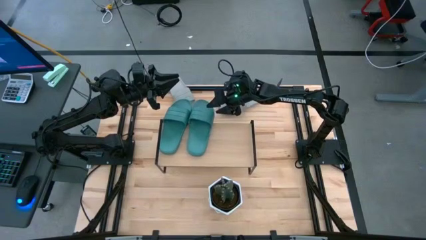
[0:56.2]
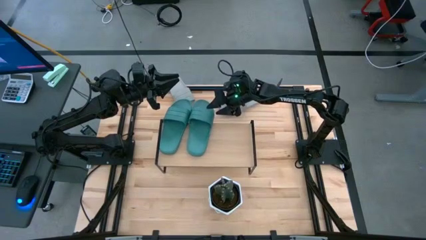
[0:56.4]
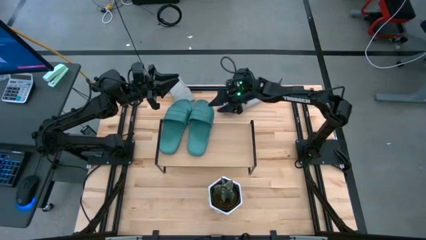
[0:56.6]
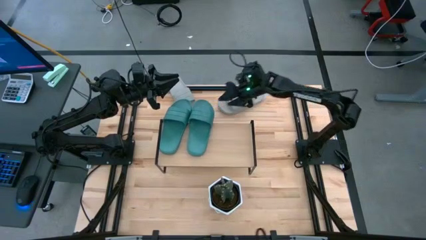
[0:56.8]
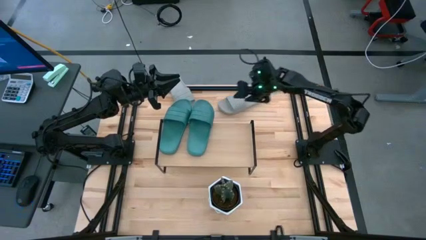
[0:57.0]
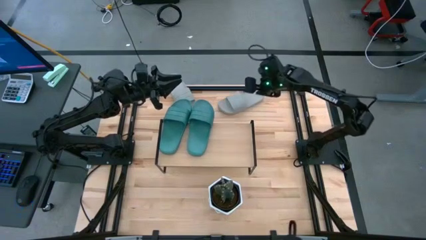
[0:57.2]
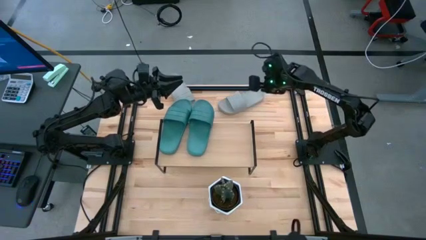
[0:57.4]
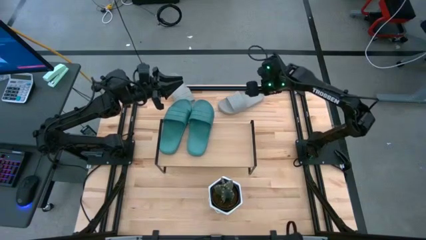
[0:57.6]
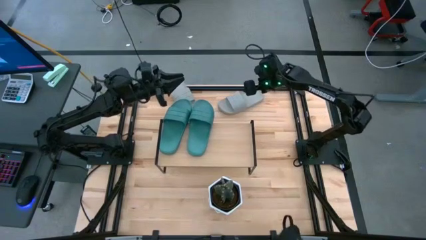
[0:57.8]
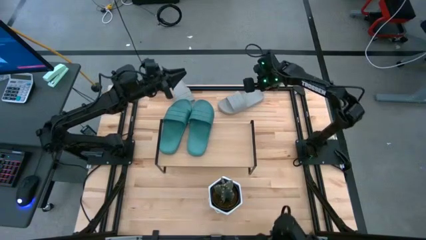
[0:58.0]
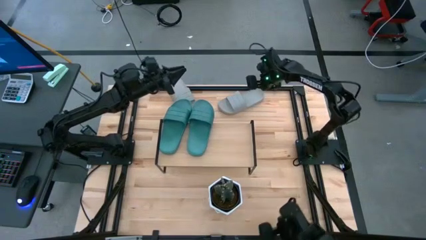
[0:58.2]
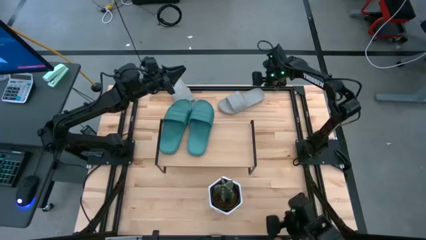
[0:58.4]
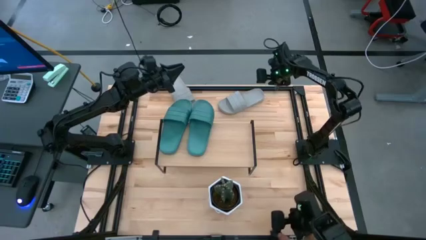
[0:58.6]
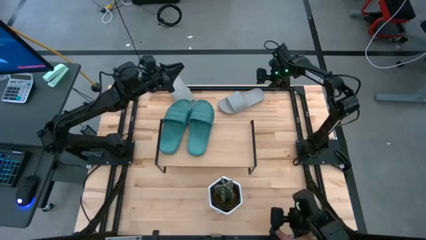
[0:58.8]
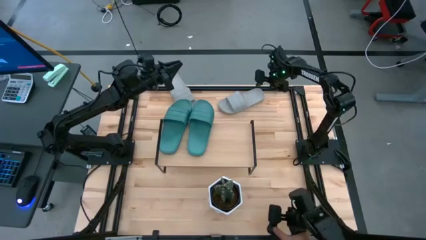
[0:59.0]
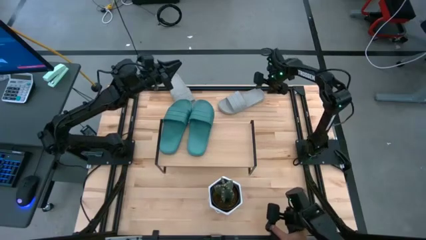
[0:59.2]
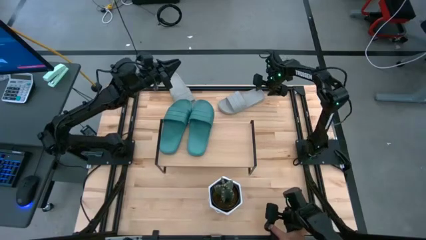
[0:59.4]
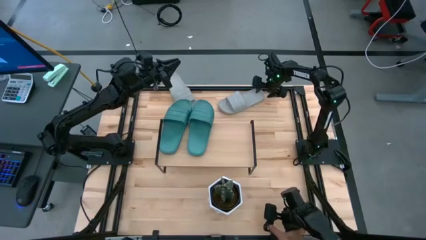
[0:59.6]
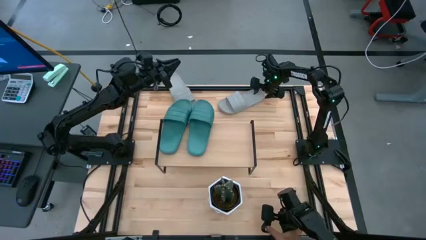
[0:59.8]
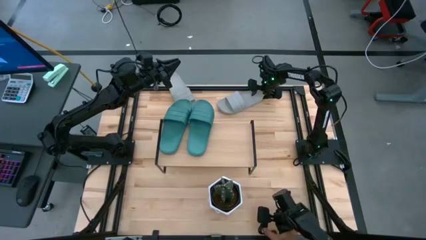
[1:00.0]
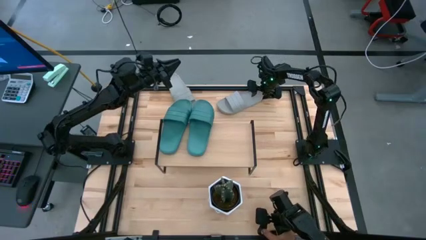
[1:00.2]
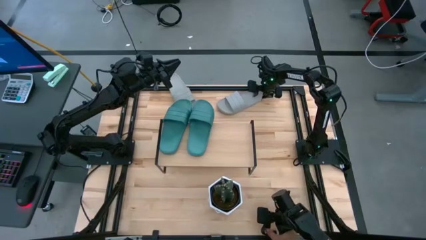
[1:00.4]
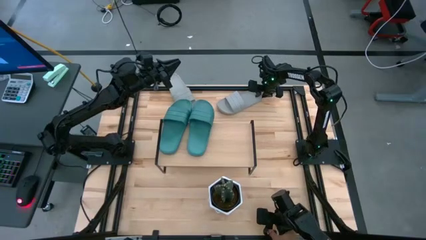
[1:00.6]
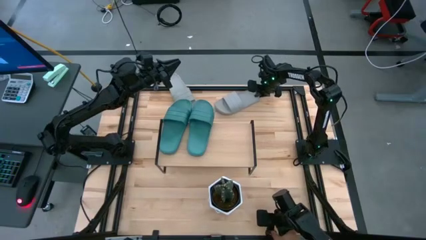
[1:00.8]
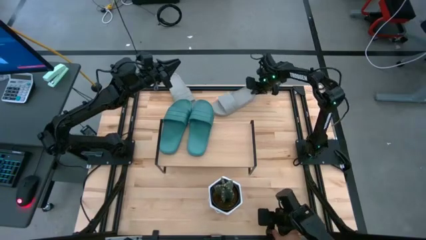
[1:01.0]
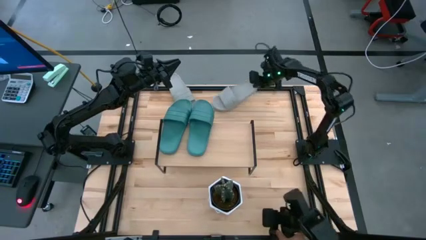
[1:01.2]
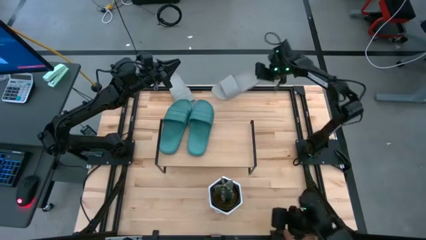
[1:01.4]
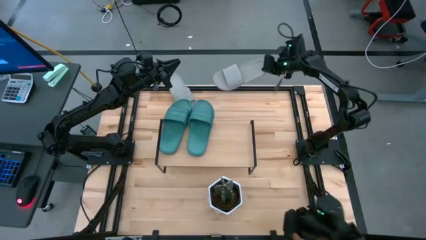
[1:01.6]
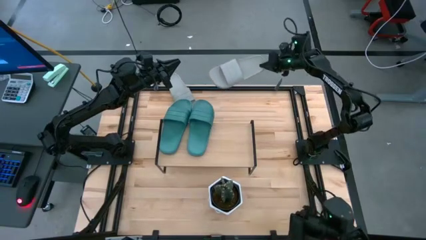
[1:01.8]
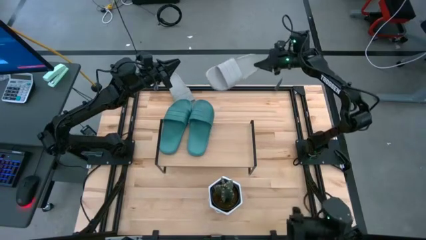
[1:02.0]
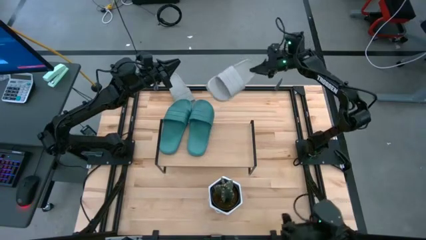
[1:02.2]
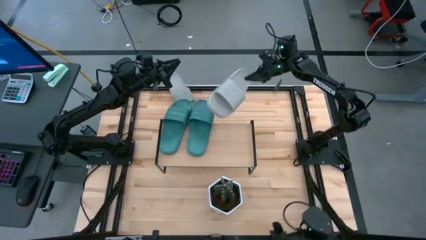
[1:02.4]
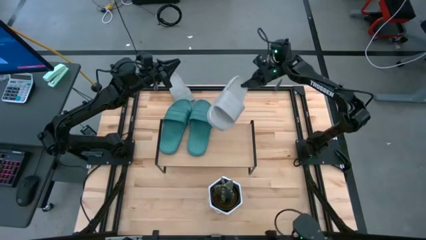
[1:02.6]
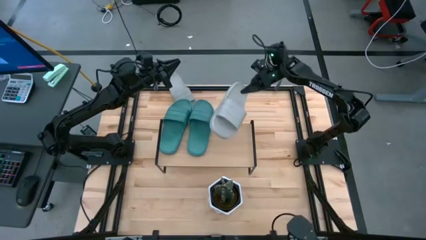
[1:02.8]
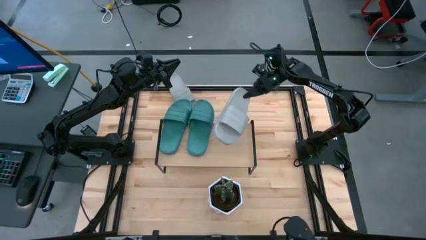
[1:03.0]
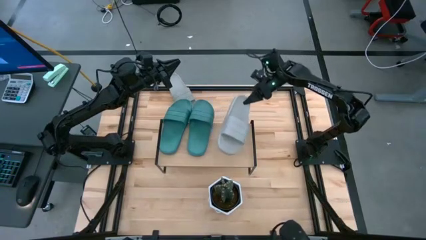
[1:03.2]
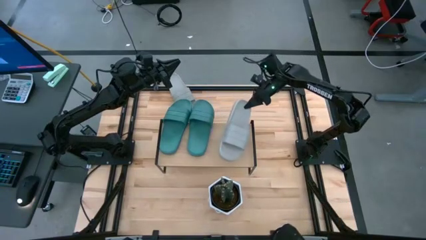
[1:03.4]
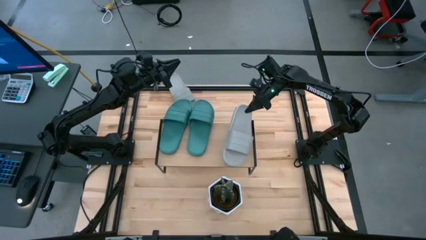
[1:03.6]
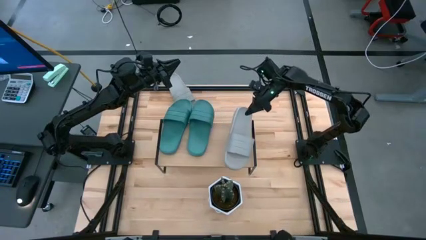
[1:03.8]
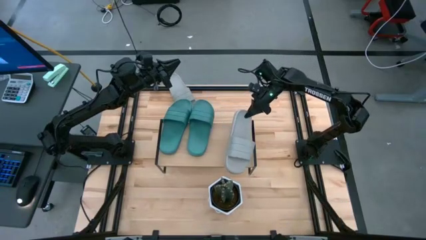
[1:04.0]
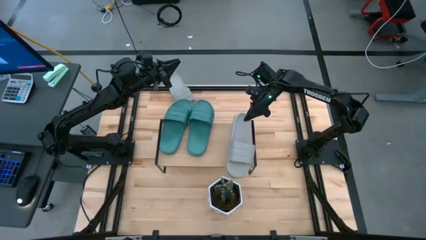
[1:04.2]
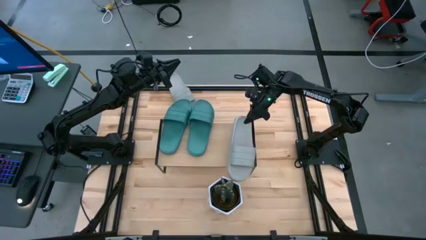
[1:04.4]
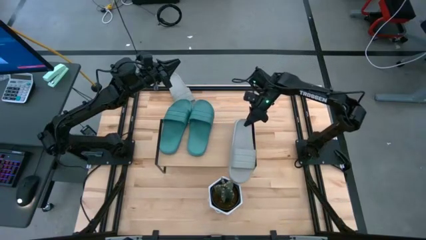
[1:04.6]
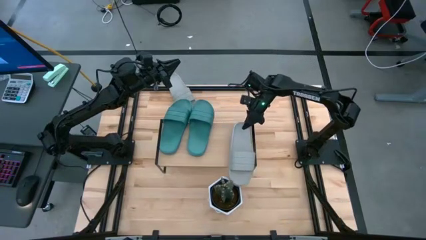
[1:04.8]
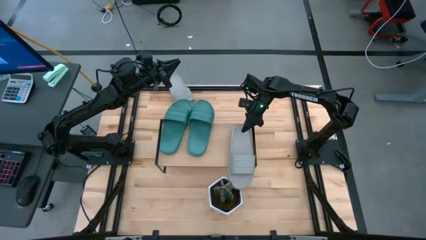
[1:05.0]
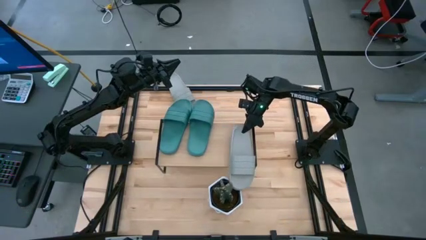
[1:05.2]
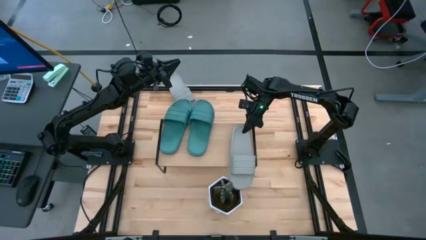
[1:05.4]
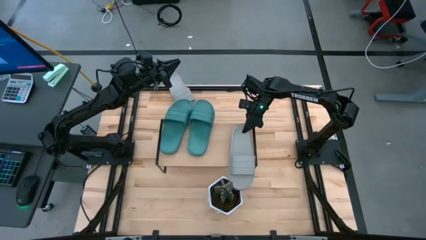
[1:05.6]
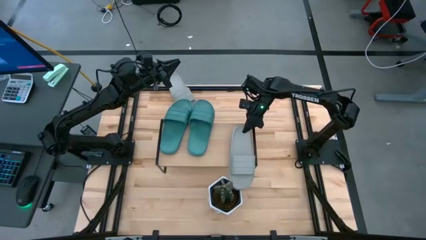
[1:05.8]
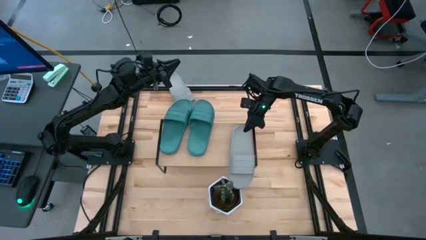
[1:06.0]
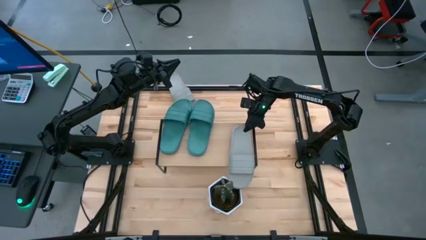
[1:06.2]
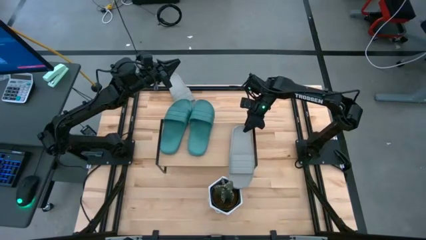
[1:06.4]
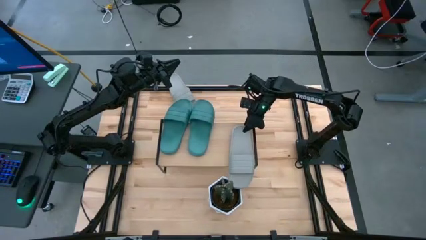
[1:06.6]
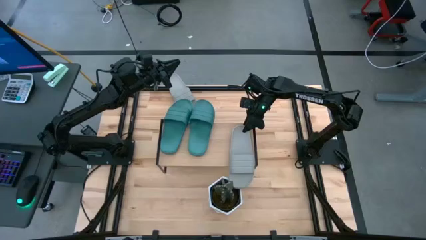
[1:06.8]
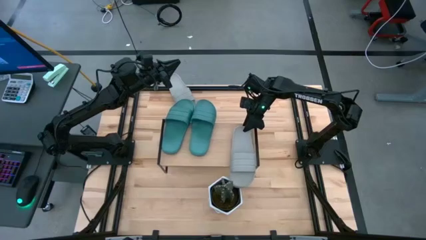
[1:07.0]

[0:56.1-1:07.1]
Task: Pick and place slides into the shelf
Put the right gray slipper on the shelf

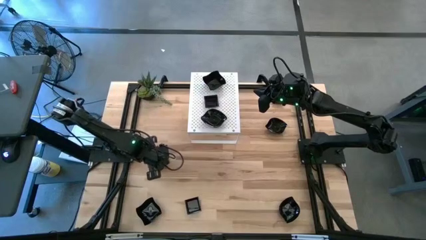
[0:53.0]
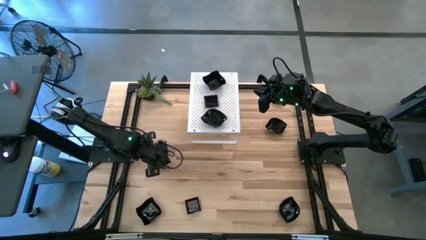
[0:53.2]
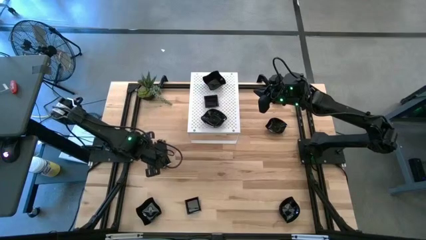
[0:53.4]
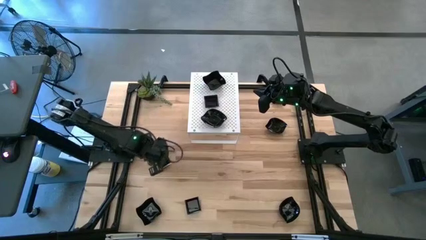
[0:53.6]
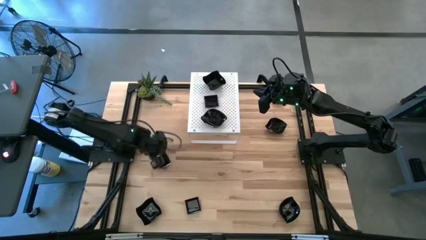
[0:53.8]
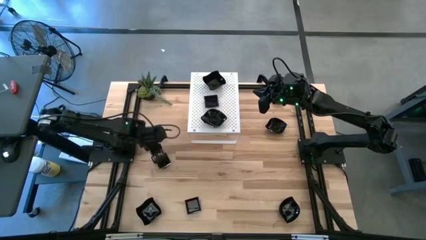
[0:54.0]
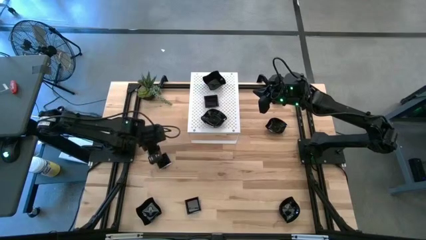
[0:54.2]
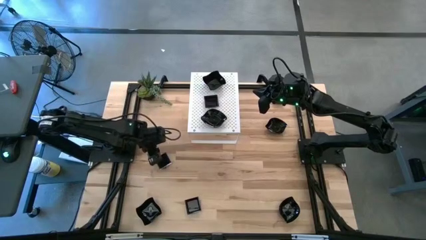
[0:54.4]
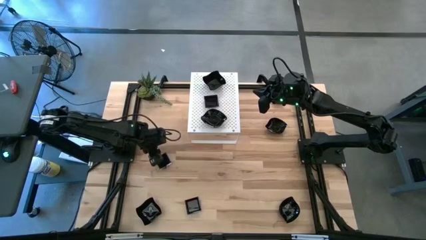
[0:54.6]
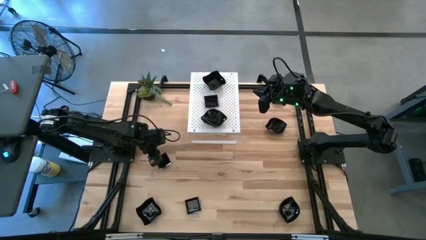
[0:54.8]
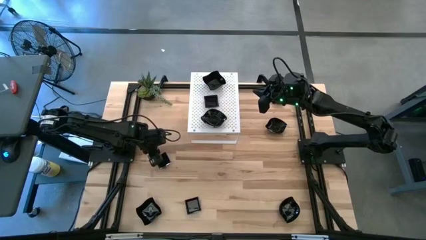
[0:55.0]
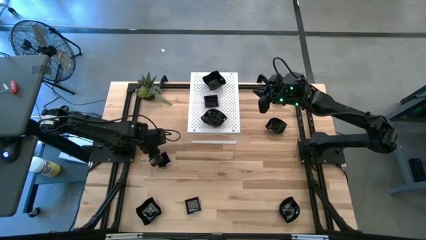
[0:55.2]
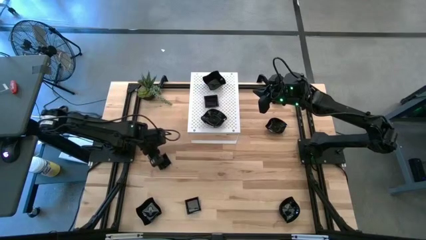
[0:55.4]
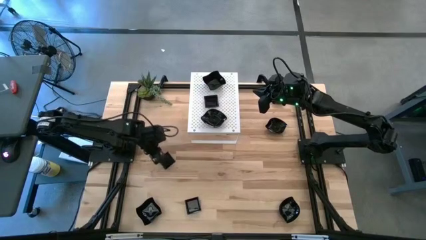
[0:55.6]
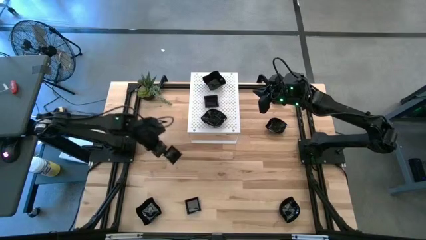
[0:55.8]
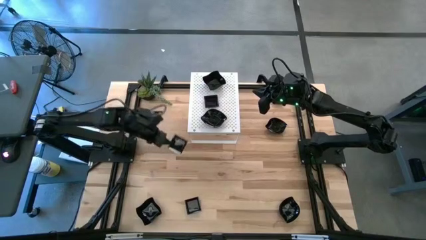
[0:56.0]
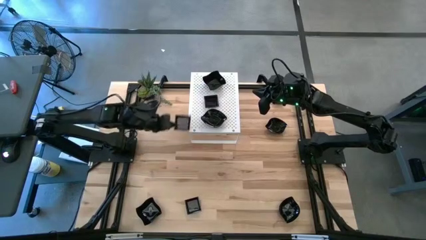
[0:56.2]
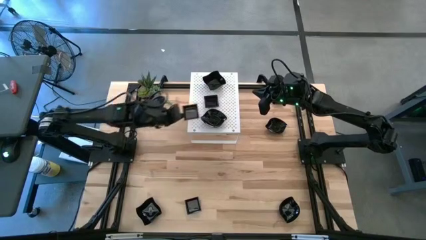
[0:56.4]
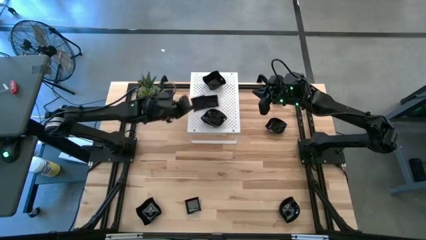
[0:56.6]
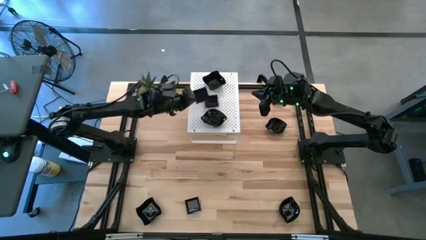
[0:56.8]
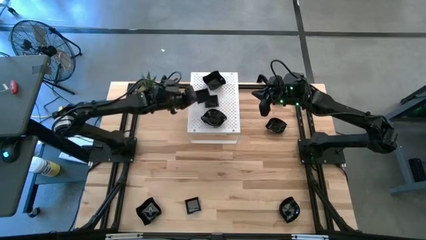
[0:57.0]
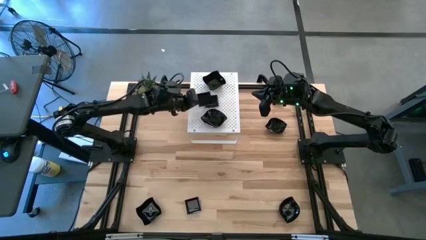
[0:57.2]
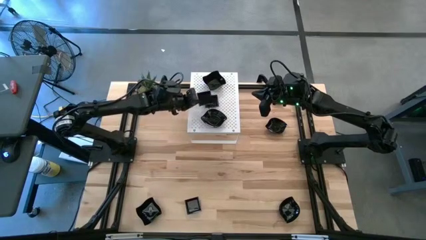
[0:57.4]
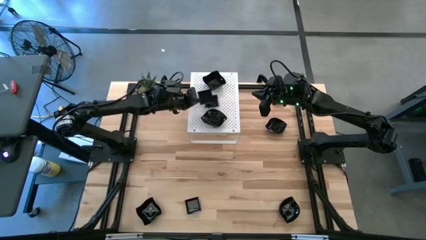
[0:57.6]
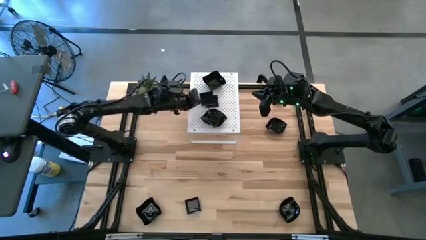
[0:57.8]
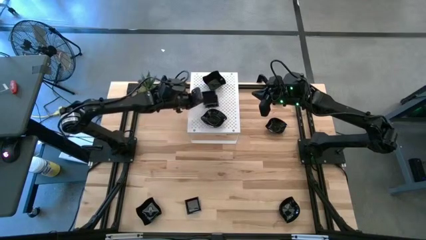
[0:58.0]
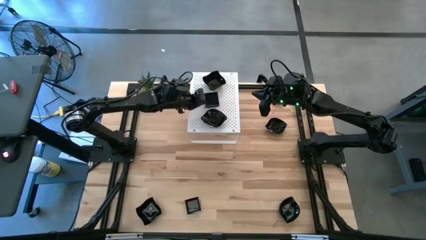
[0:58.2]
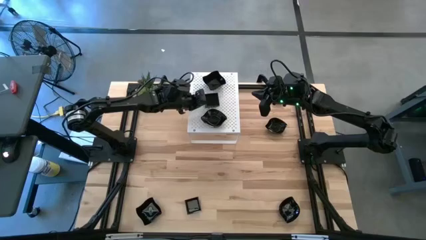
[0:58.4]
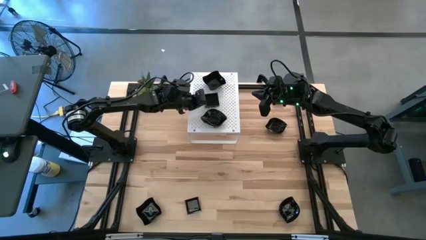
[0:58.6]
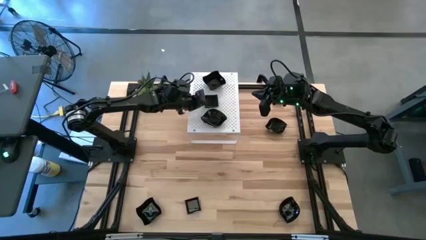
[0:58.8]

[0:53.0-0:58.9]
Task: Pick & Place Mini shaped plates
Stack the black square plate on top of the black square plate on the shelf
